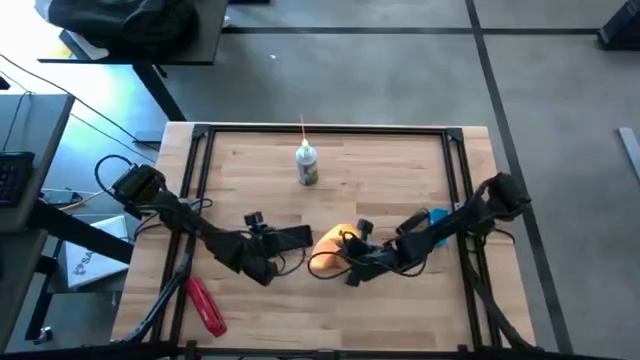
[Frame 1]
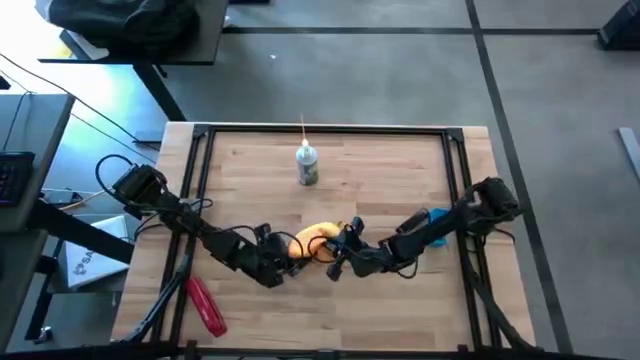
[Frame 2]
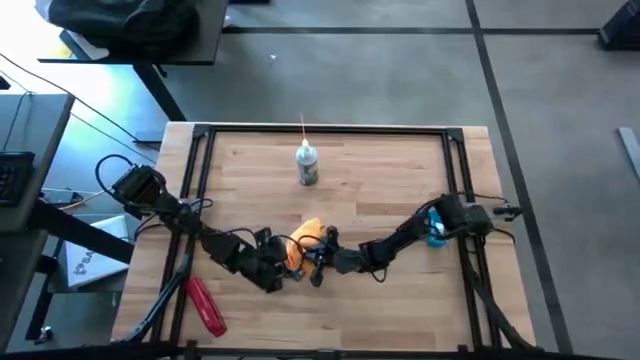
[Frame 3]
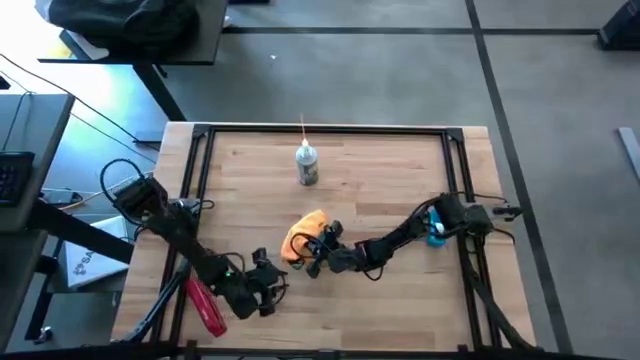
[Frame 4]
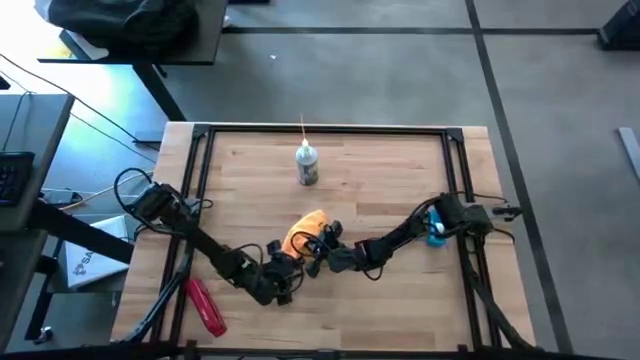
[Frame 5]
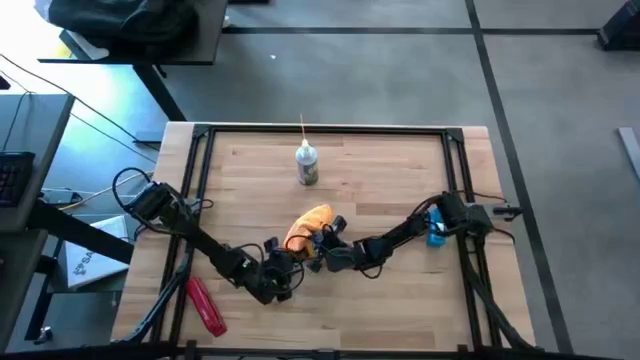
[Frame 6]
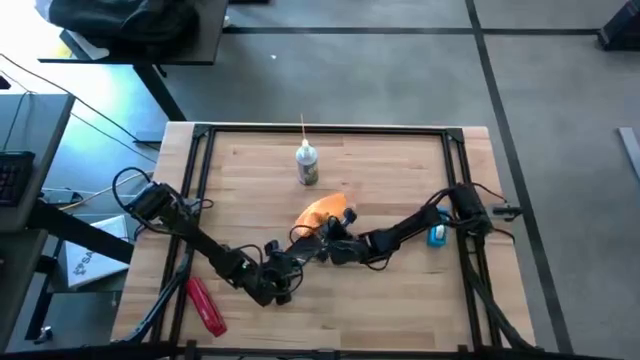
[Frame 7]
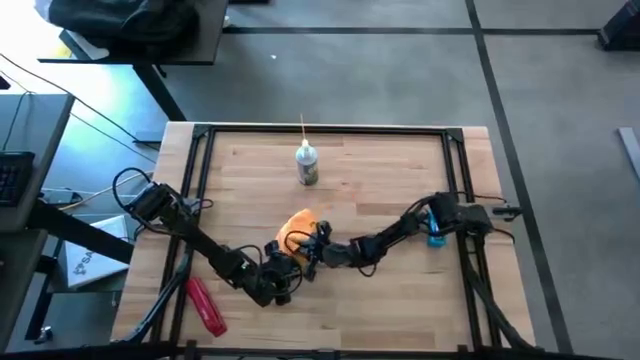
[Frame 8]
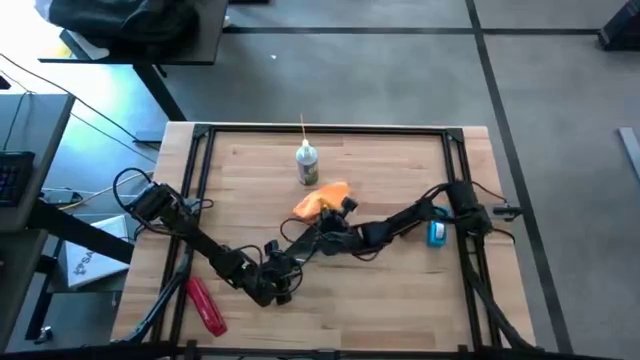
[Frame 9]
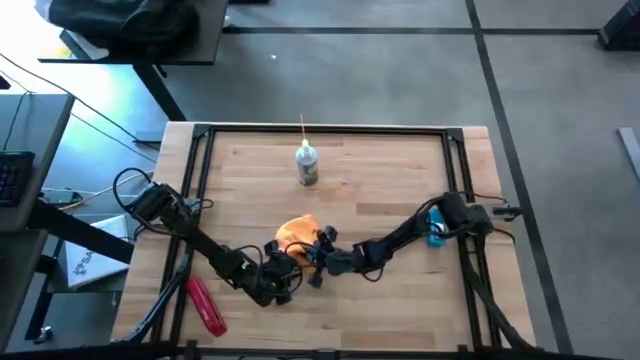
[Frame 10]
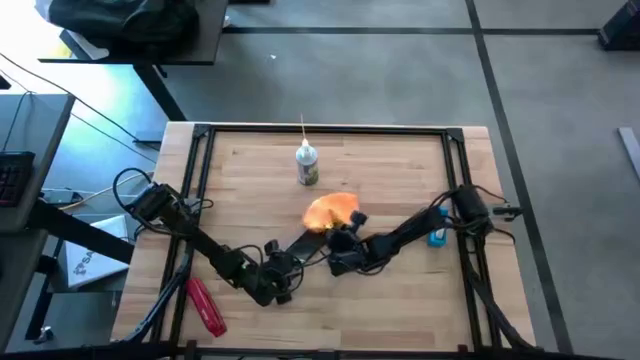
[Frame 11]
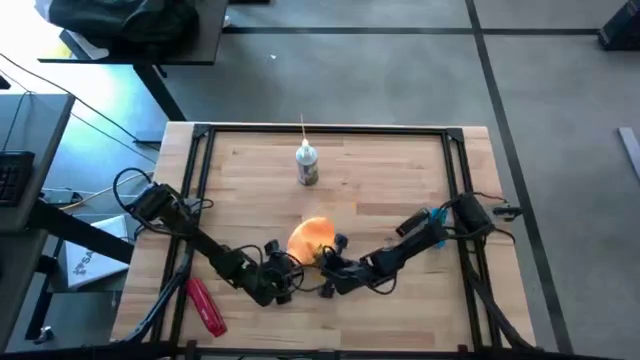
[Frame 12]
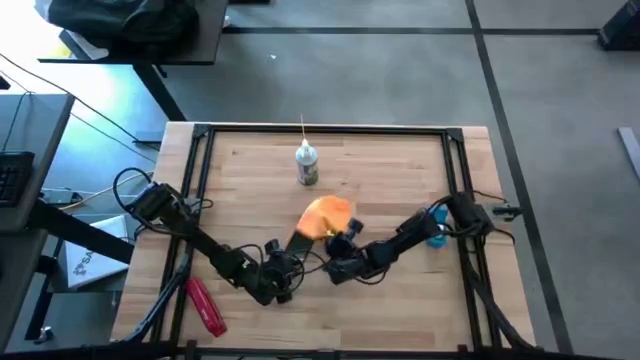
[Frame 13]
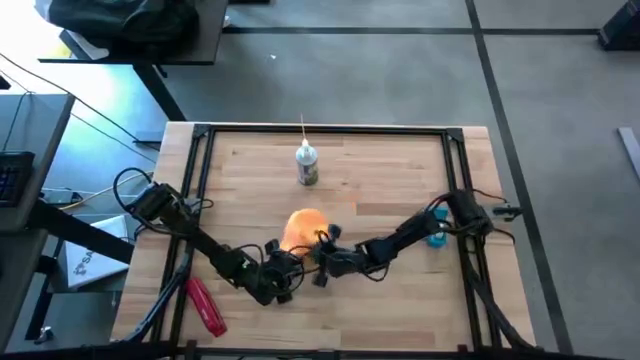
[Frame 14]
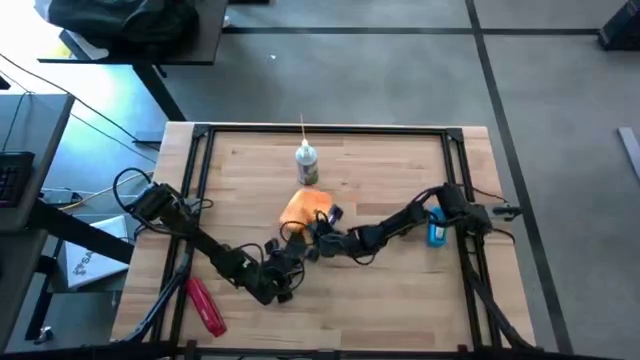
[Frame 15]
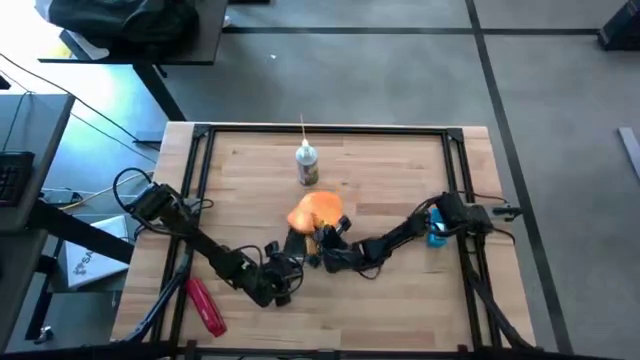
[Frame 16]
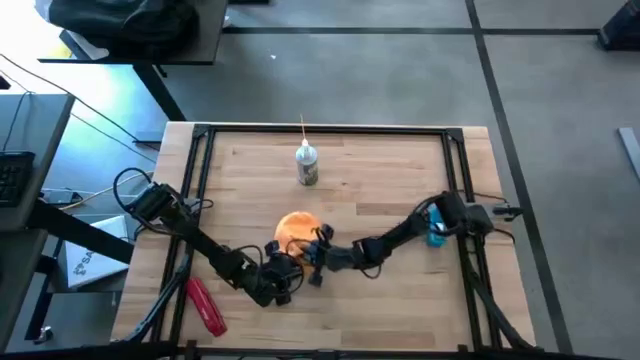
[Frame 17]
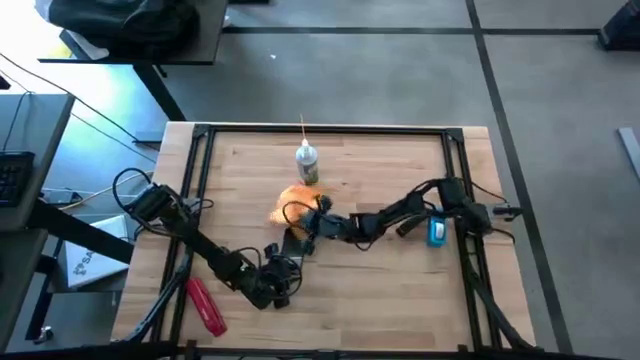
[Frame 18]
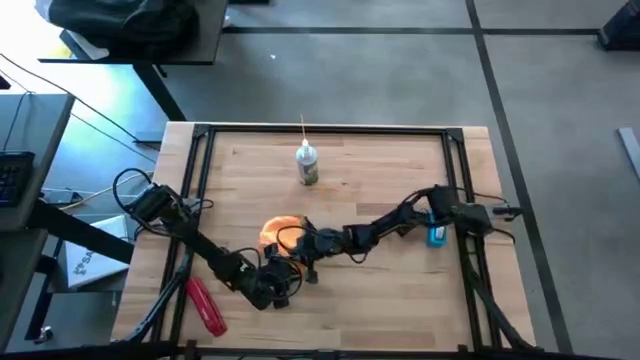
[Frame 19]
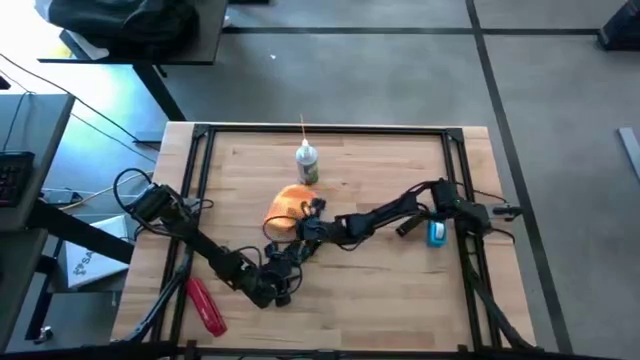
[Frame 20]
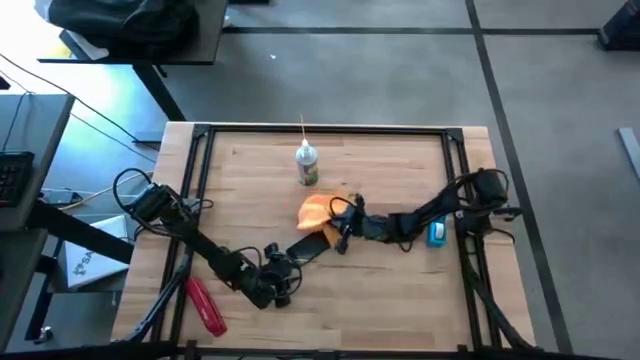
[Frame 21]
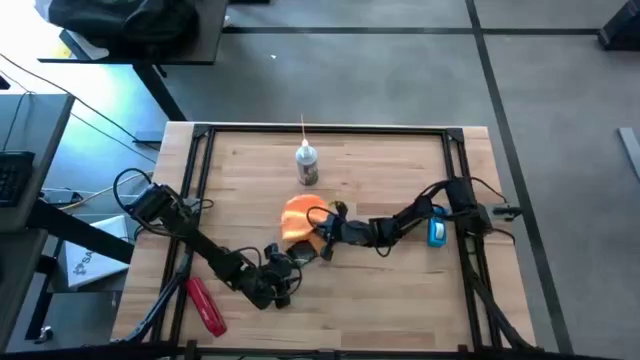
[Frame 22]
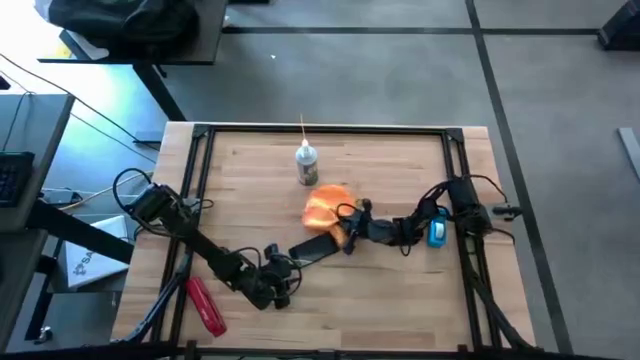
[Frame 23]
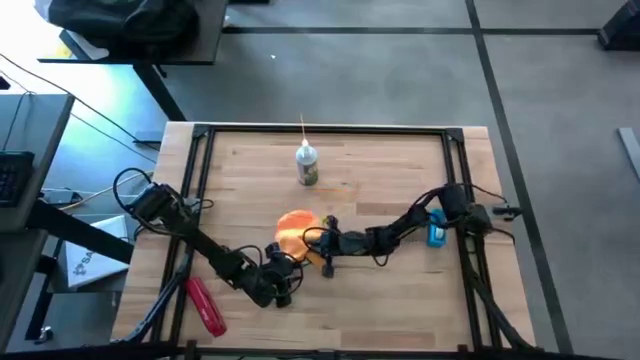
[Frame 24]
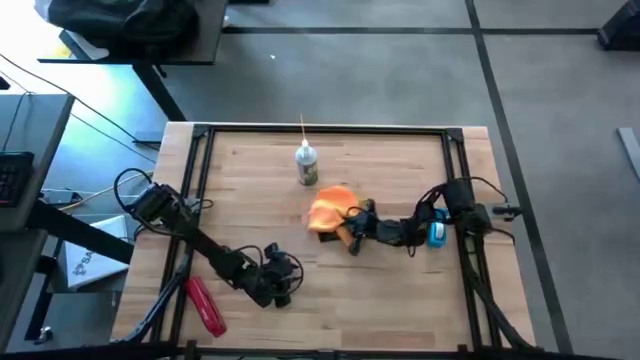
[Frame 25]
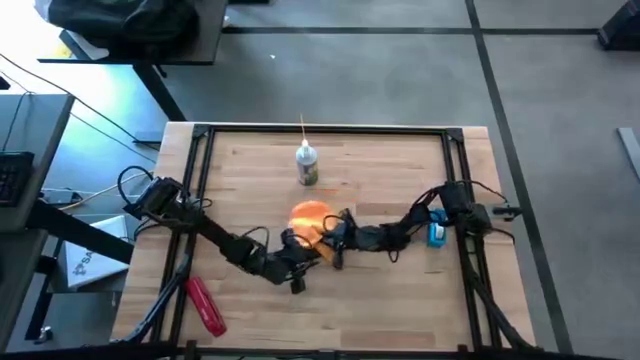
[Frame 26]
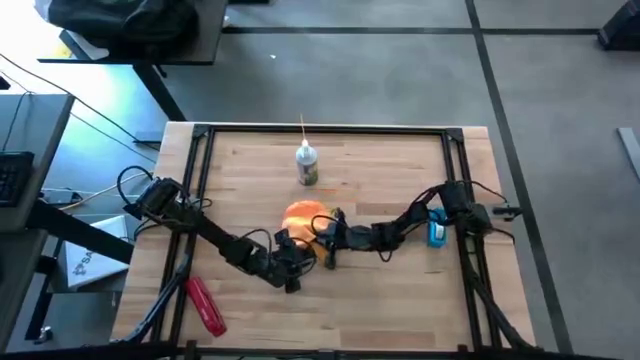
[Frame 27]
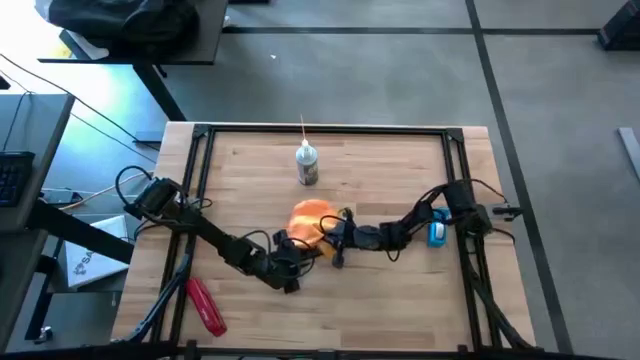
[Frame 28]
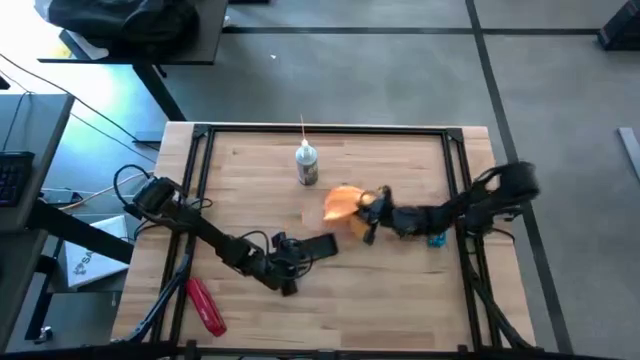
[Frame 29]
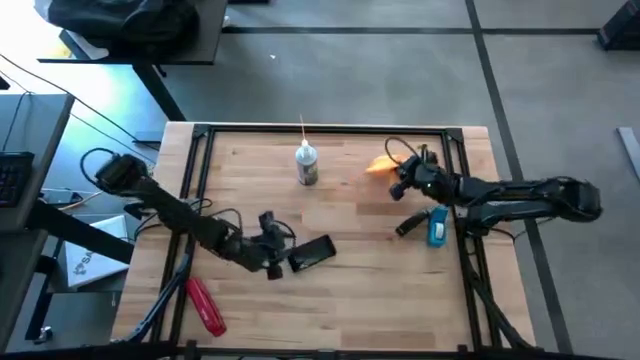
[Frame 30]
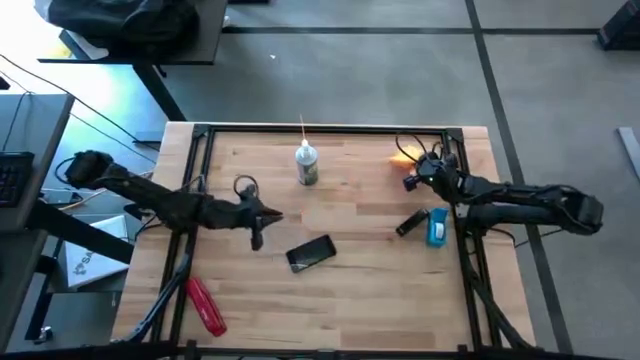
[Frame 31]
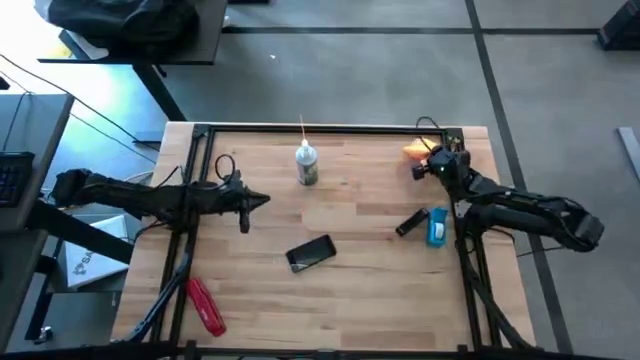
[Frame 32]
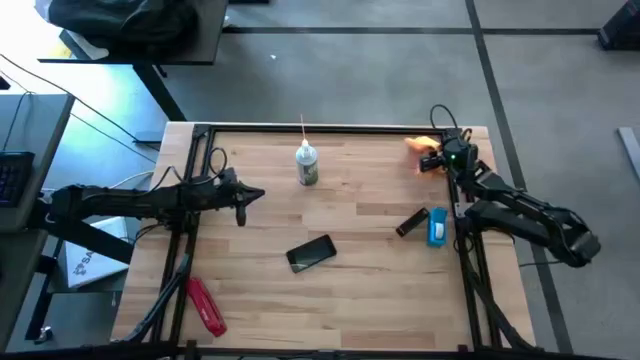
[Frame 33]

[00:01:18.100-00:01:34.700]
Task: Apply microfiber cloth
Wipe the front of the cellphone with a microfiber cloth

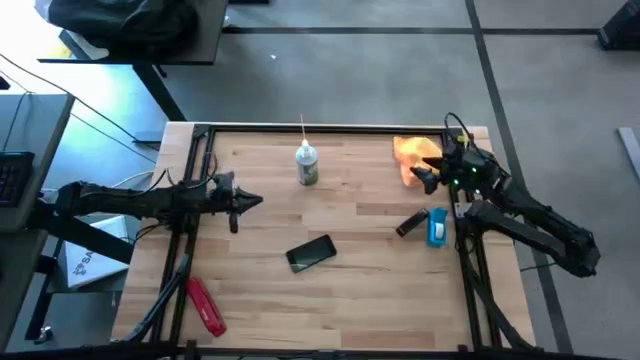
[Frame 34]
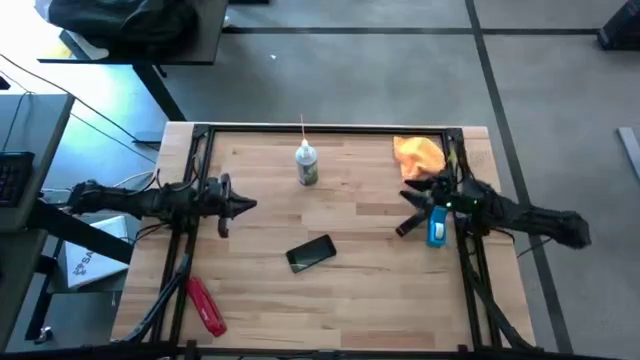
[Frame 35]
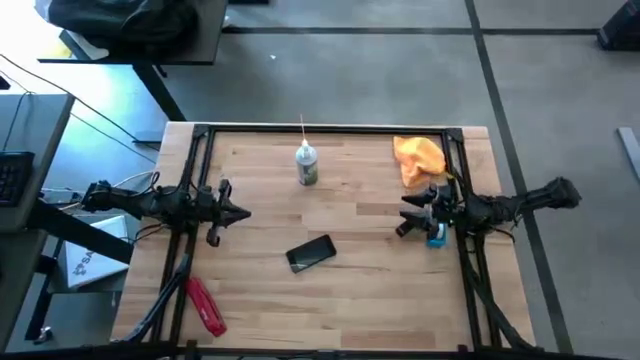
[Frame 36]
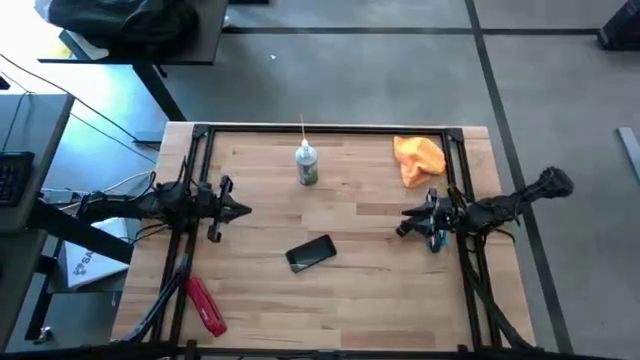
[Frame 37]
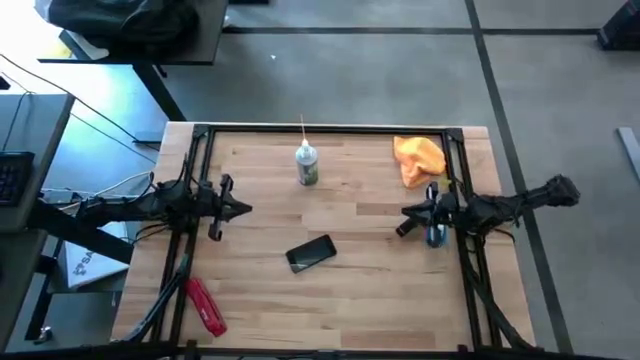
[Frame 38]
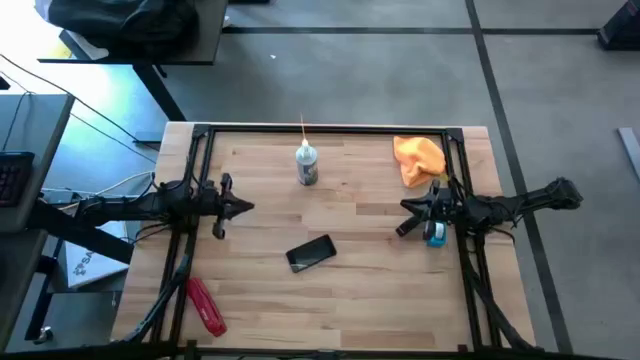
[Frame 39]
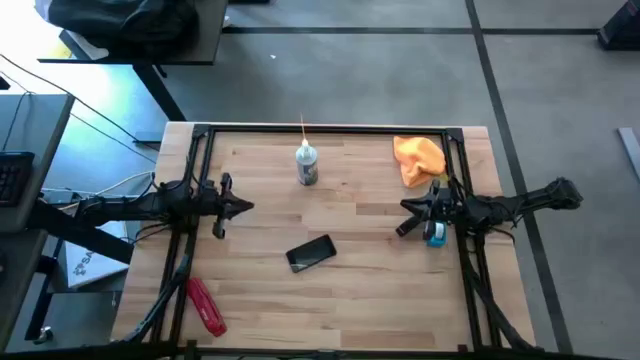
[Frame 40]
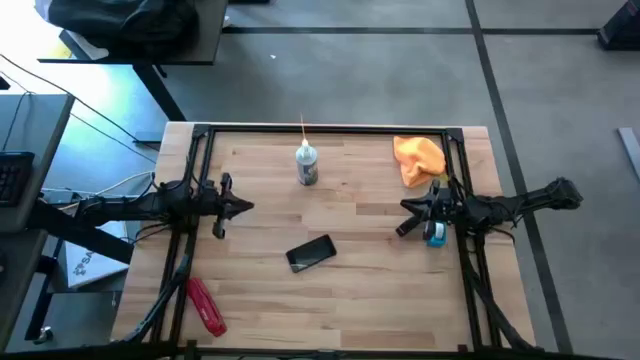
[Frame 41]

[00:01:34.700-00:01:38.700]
Return to Home Position
